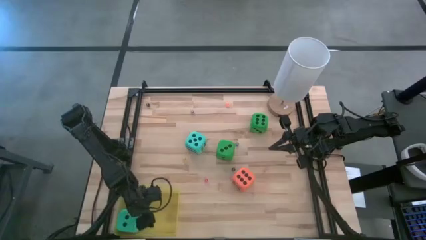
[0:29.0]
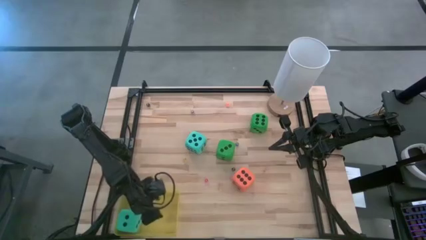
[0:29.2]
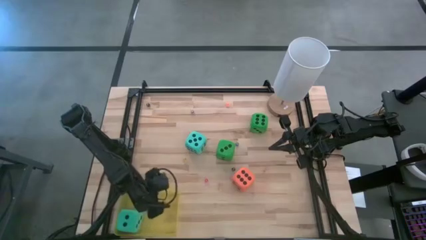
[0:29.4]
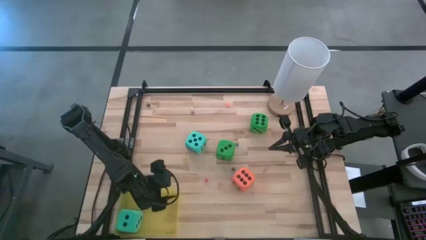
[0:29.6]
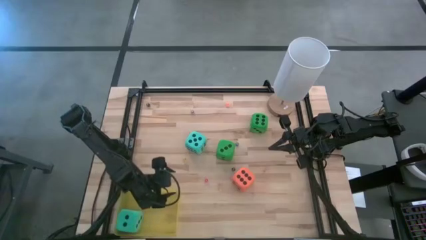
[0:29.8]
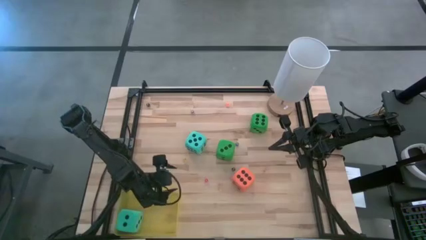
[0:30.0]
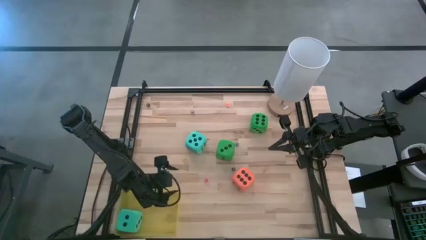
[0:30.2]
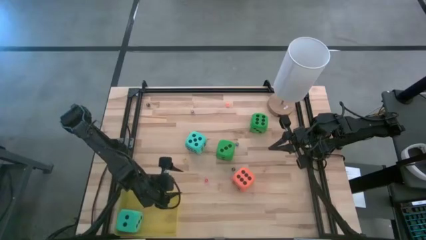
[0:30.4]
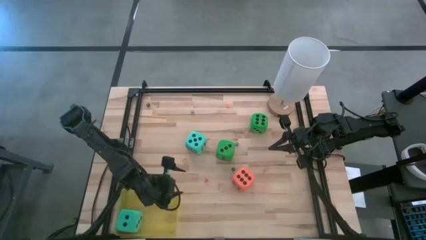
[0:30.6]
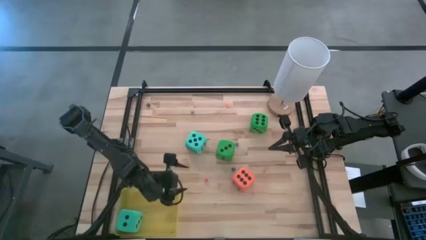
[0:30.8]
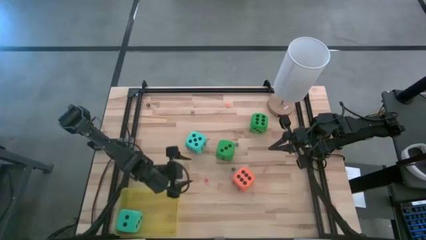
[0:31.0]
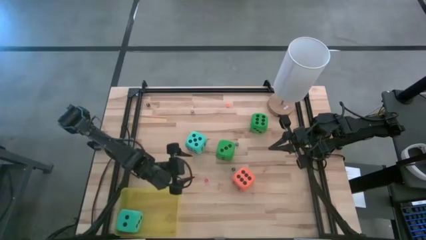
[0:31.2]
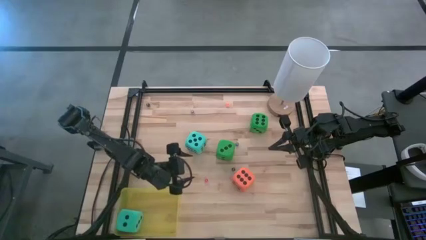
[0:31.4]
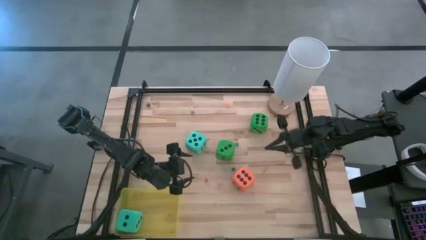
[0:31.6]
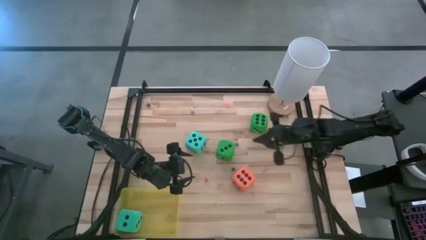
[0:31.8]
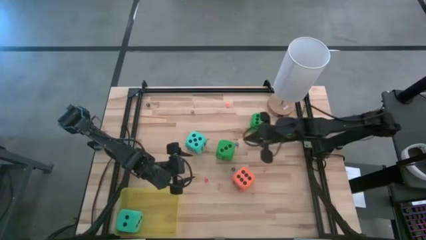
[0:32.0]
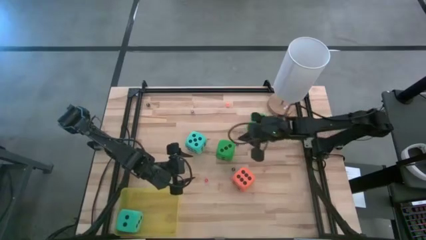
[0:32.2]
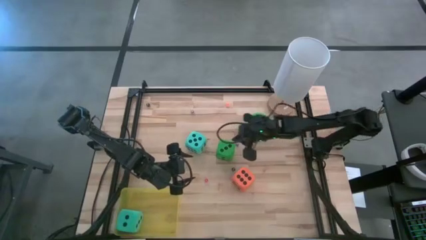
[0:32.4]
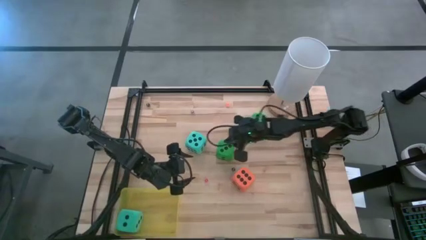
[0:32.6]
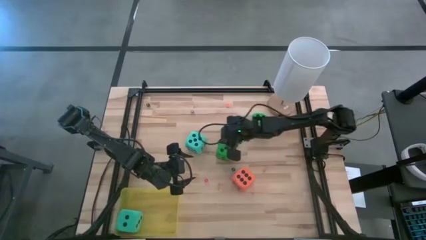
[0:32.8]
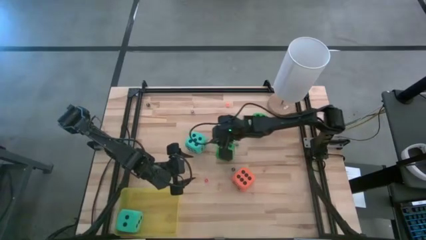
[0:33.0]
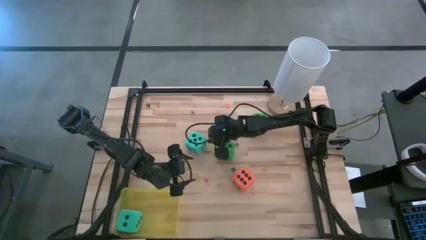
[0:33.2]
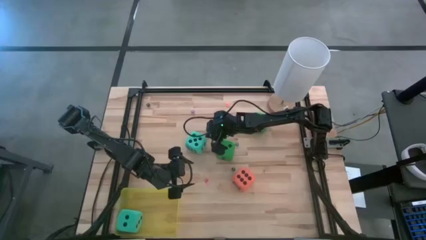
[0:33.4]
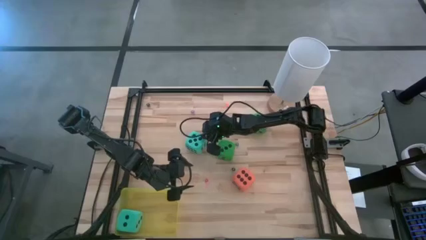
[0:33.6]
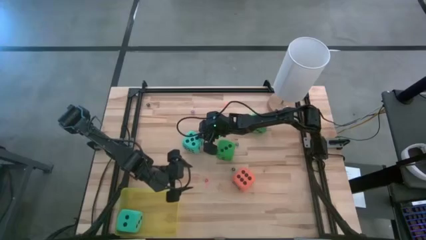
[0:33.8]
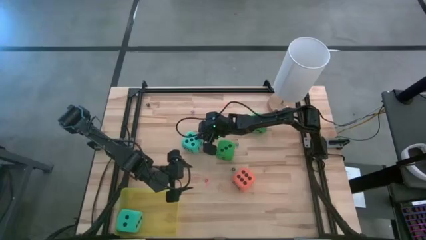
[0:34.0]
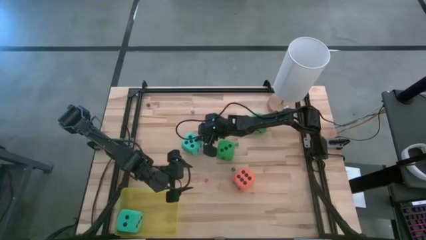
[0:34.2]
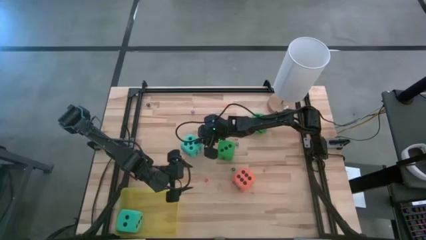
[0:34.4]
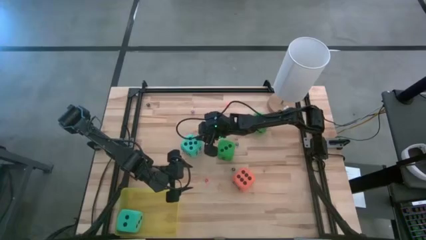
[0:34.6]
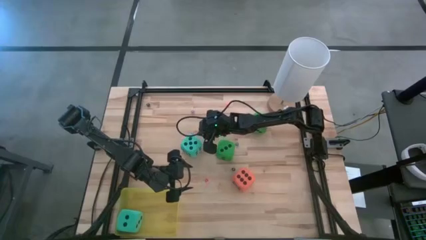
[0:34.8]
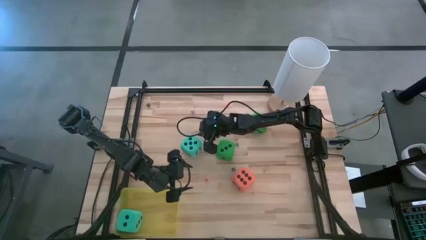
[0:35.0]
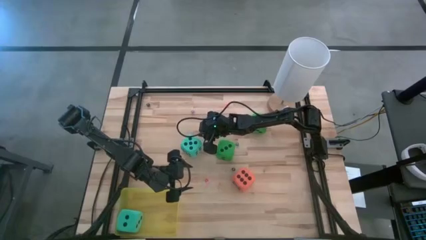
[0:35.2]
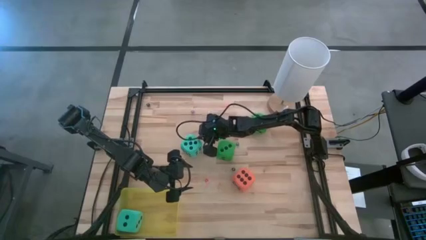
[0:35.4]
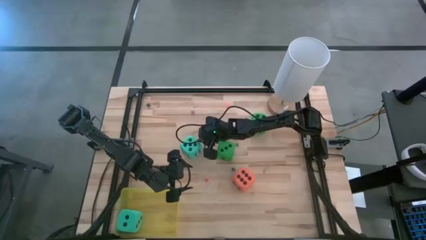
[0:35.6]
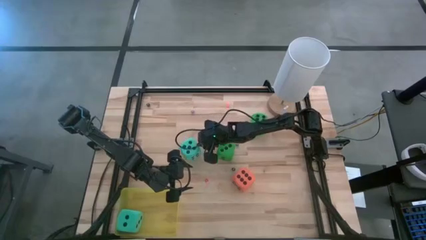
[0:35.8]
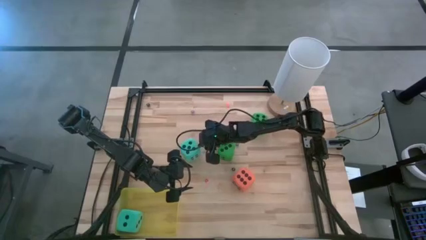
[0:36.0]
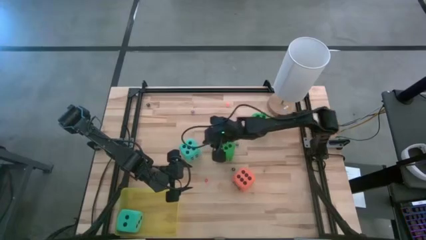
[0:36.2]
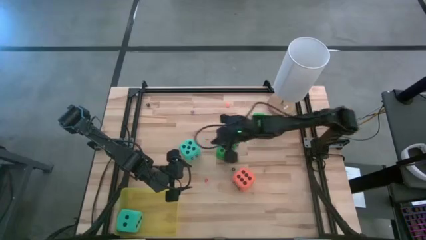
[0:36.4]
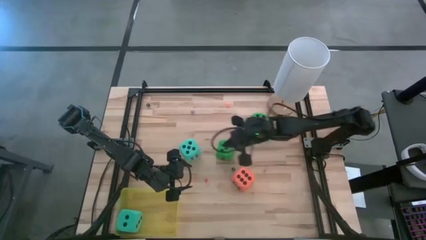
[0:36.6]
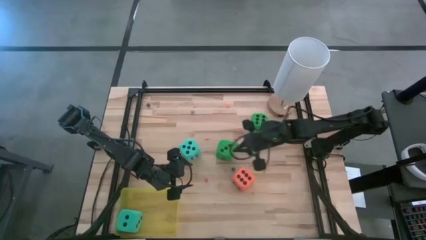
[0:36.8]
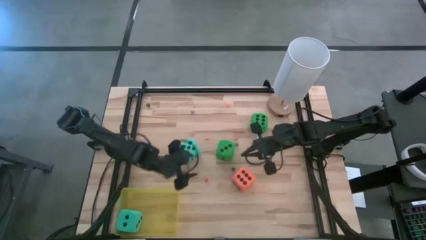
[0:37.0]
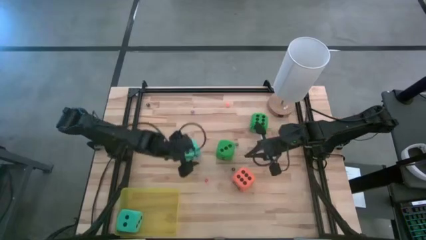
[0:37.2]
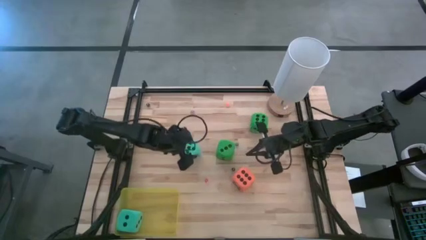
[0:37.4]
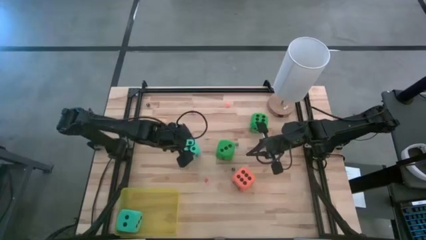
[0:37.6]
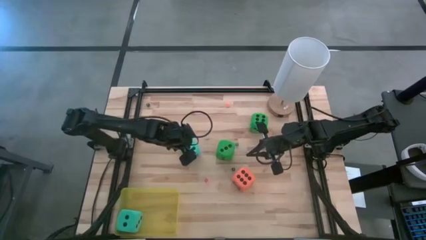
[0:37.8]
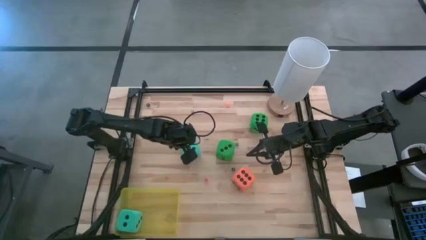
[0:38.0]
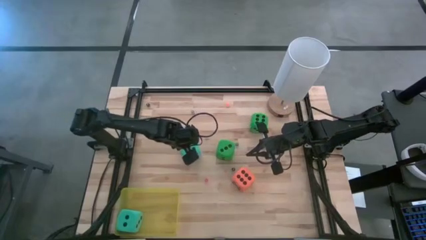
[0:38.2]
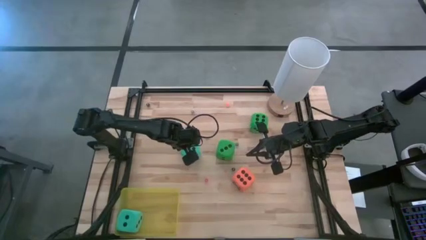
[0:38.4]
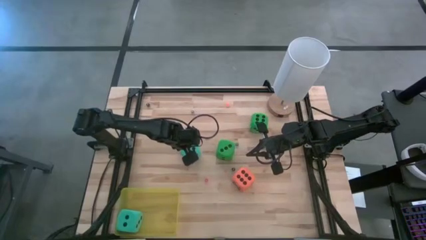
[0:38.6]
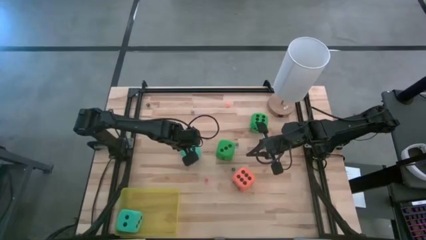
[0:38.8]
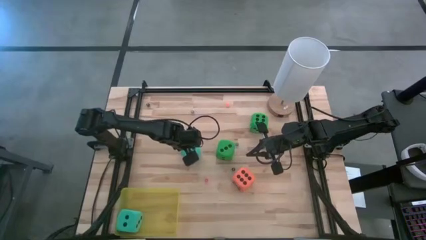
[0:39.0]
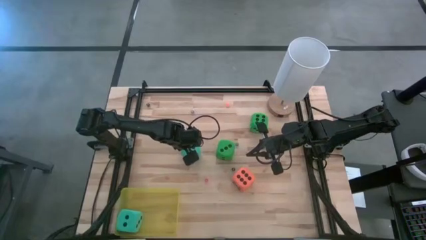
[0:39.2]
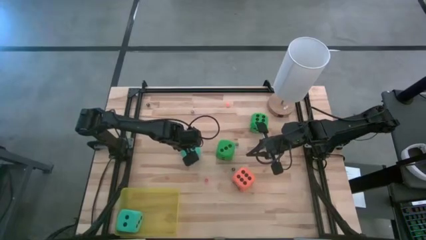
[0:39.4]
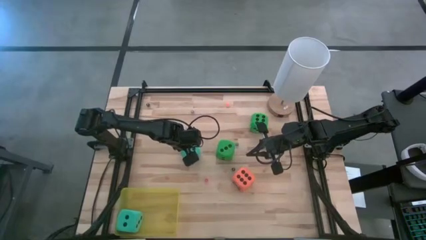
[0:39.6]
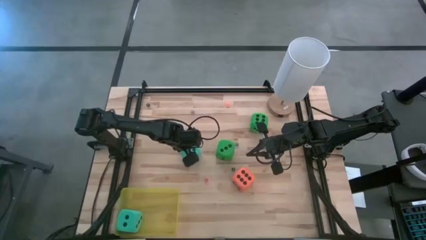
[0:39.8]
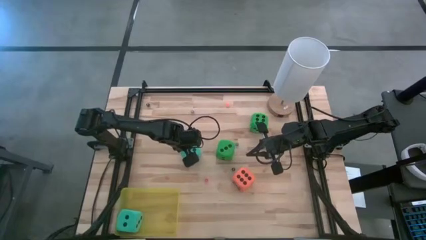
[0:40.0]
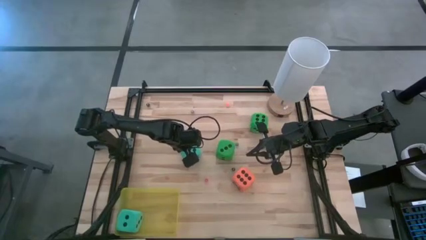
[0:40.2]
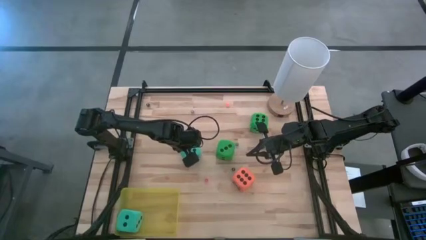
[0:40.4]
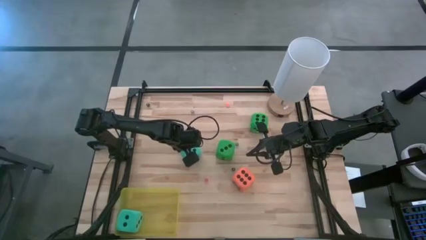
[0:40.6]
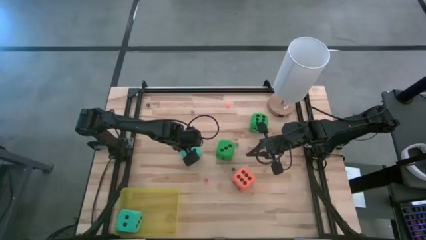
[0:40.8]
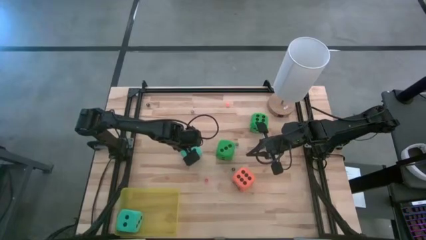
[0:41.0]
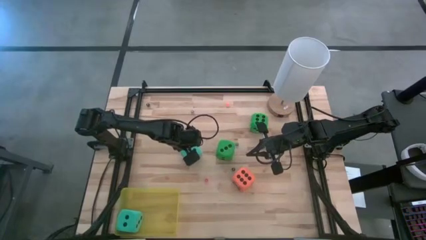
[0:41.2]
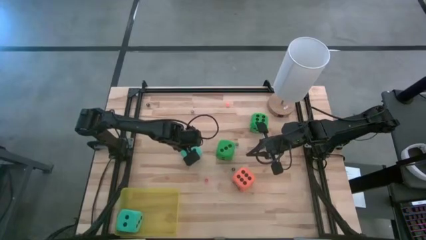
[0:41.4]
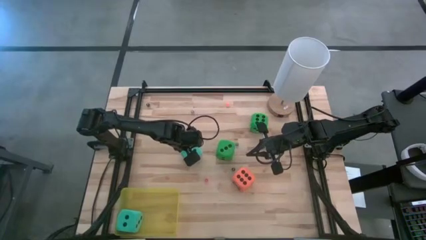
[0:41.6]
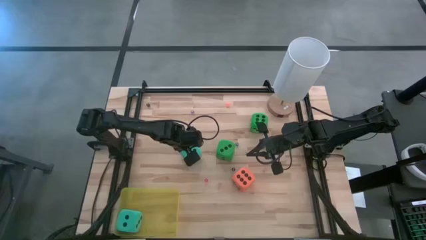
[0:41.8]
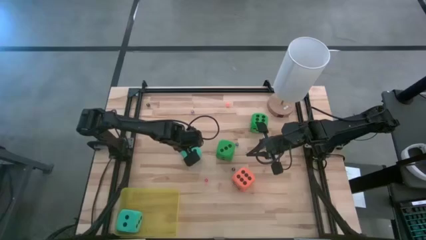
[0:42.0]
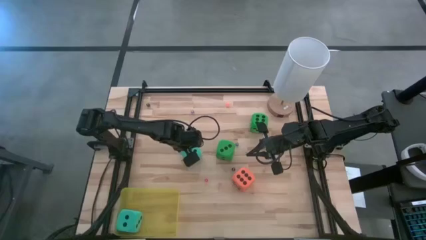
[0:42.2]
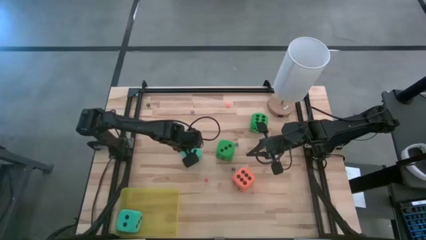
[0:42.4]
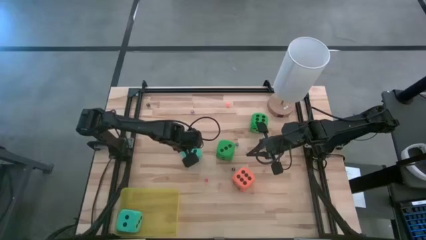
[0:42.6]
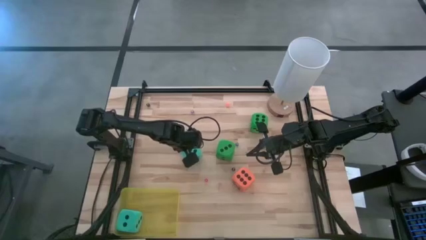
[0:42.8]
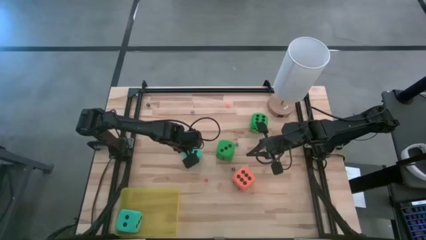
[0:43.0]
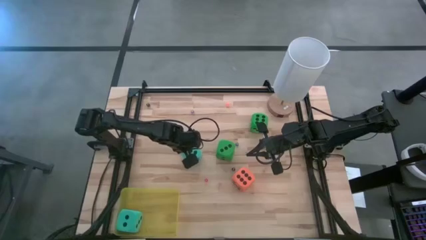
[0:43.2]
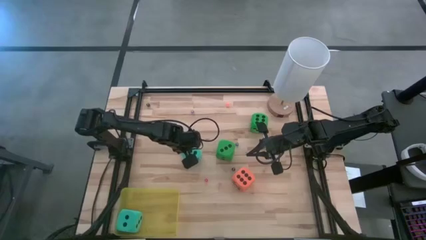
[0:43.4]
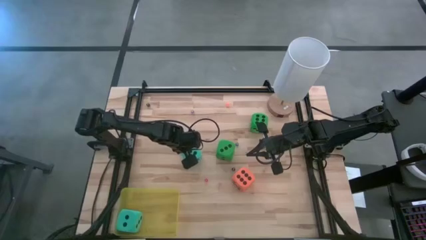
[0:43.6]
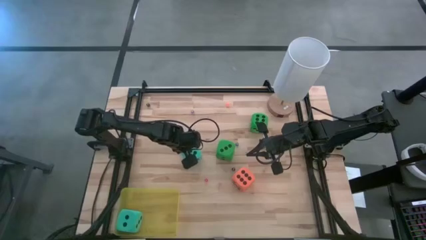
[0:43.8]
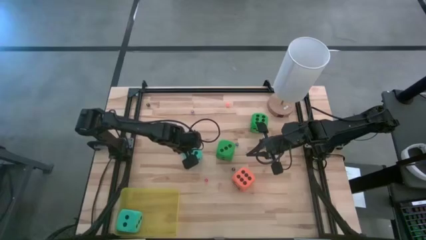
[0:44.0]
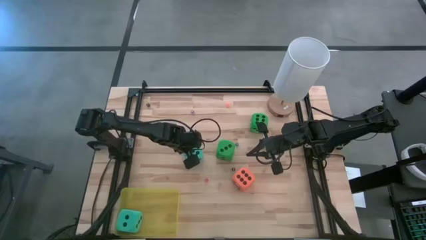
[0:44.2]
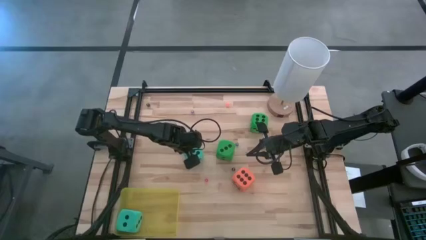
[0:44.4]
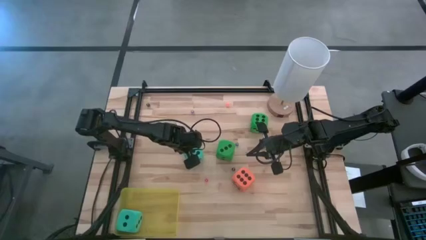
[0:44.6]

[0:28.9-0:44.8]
Task: Pick & Place Dice
Put the large blue dice into the yellow bin
